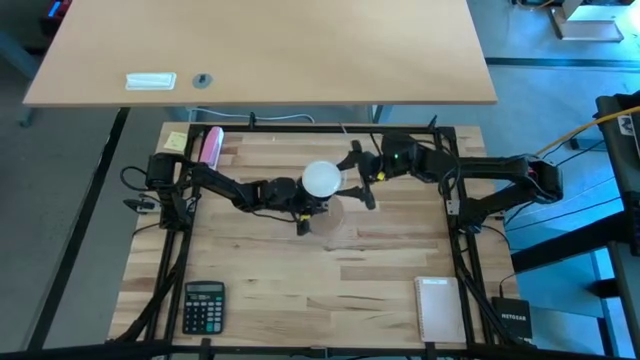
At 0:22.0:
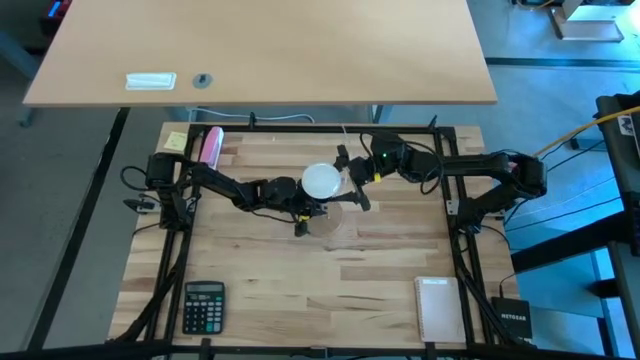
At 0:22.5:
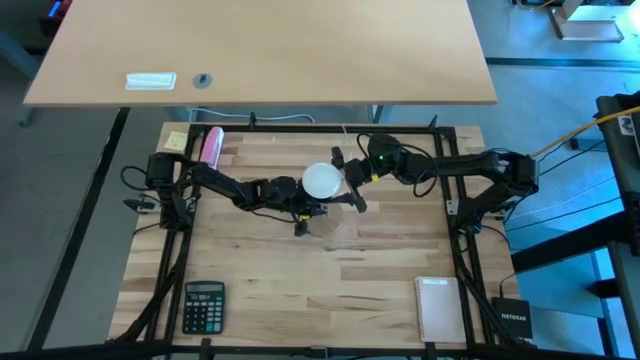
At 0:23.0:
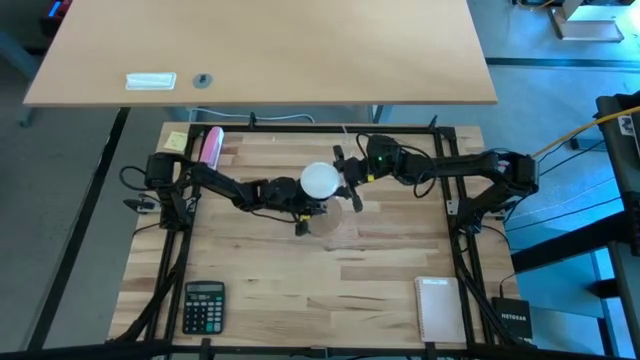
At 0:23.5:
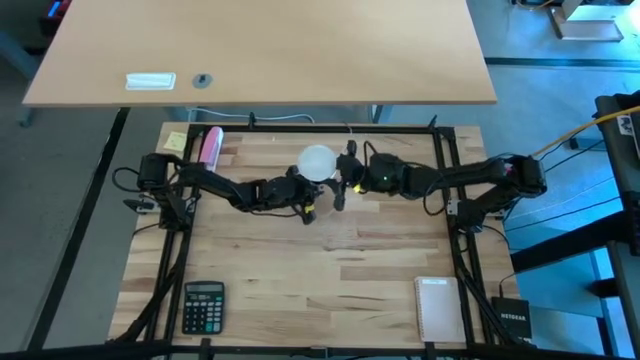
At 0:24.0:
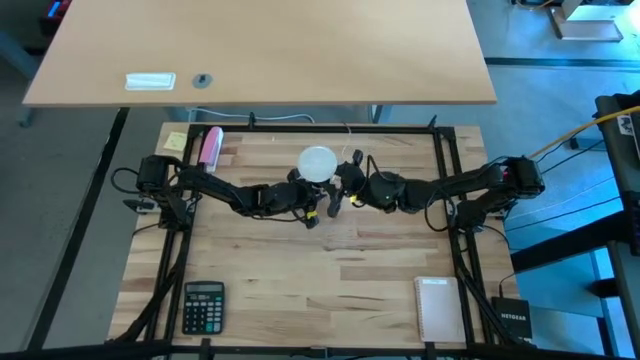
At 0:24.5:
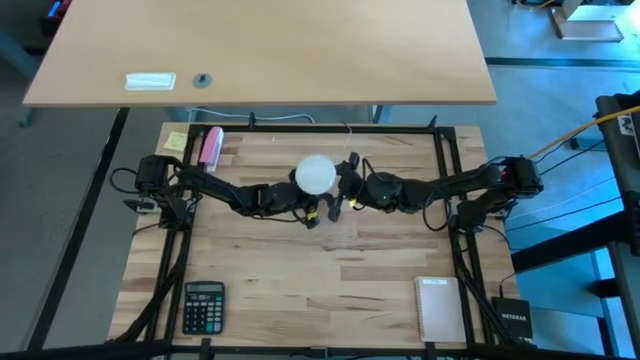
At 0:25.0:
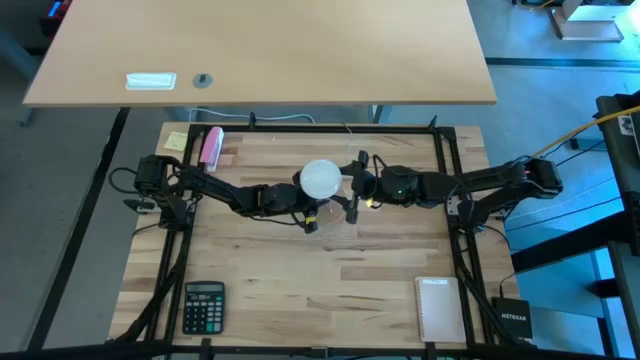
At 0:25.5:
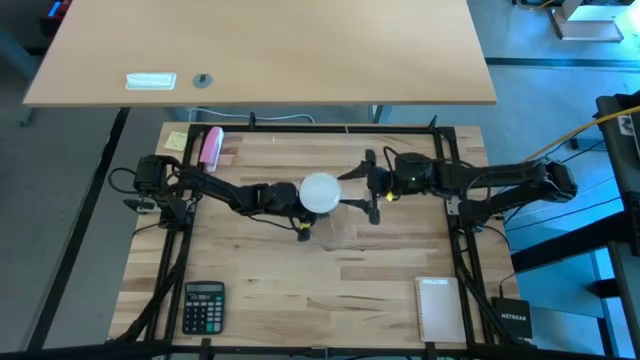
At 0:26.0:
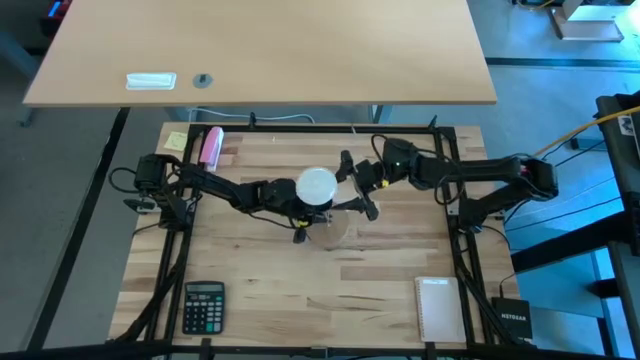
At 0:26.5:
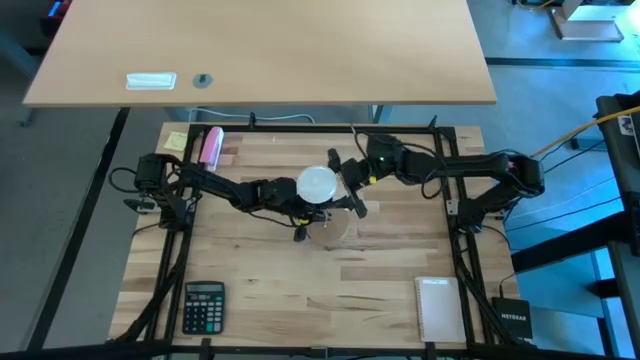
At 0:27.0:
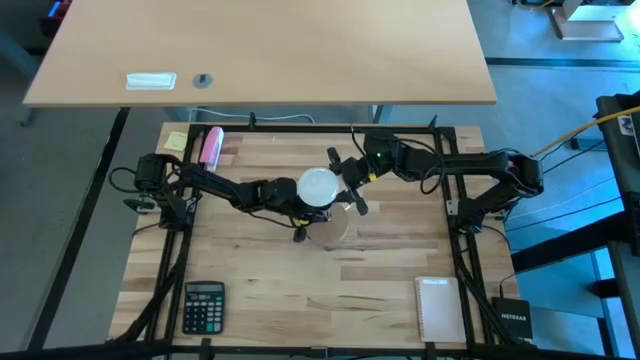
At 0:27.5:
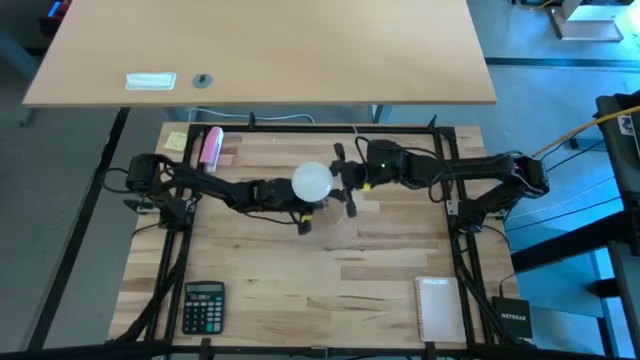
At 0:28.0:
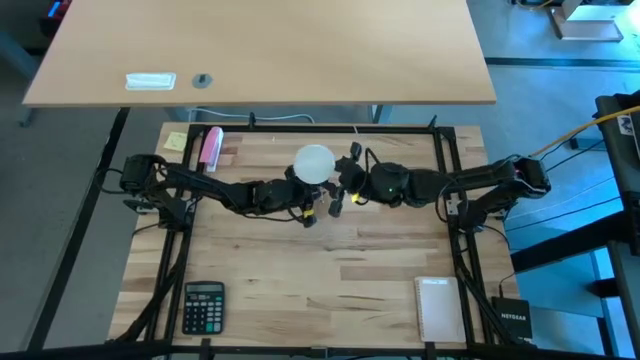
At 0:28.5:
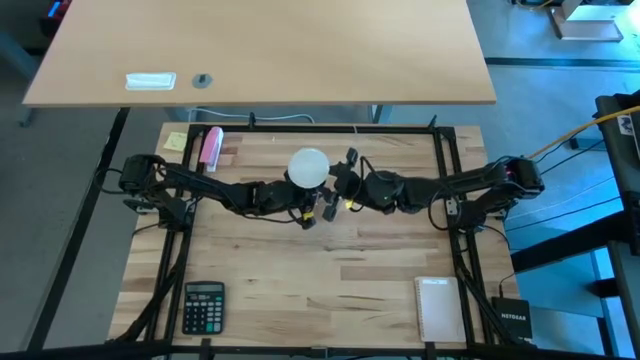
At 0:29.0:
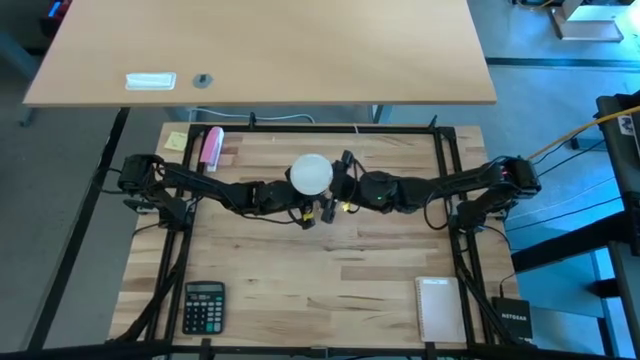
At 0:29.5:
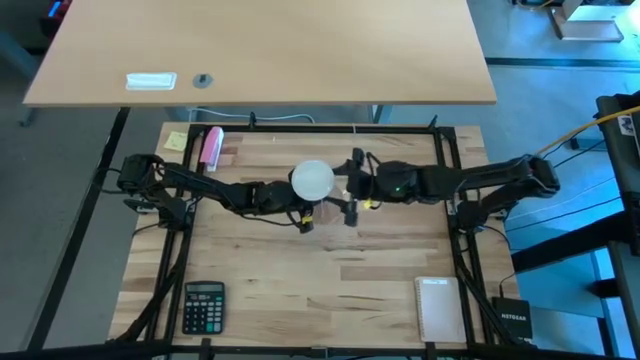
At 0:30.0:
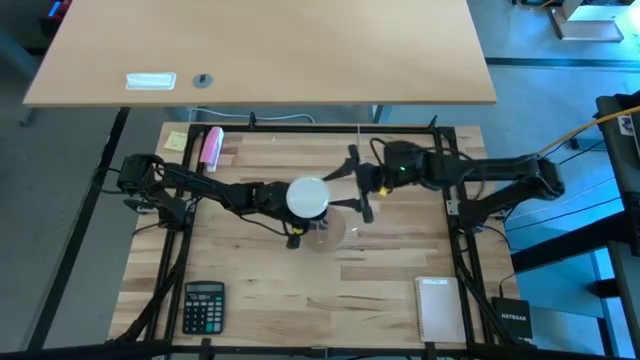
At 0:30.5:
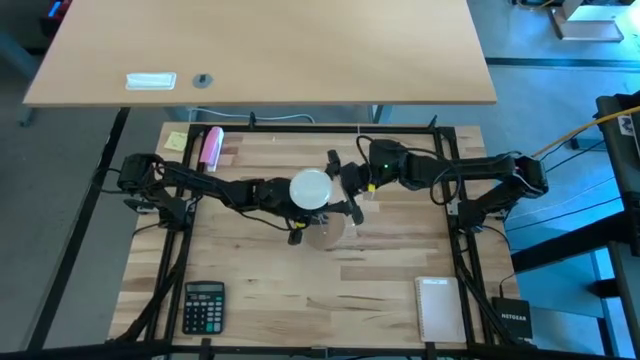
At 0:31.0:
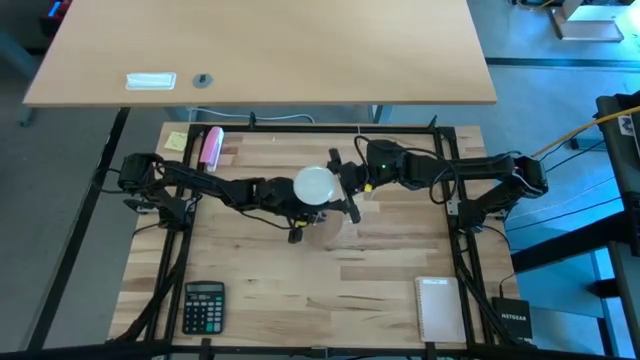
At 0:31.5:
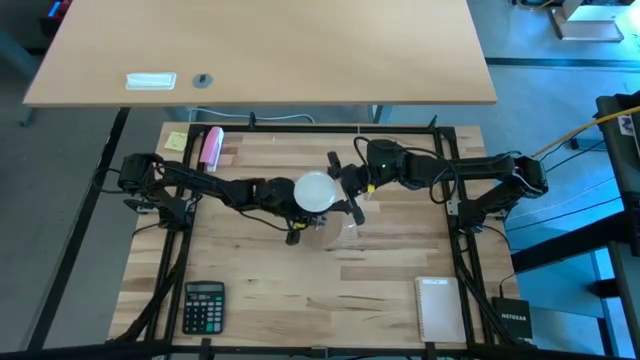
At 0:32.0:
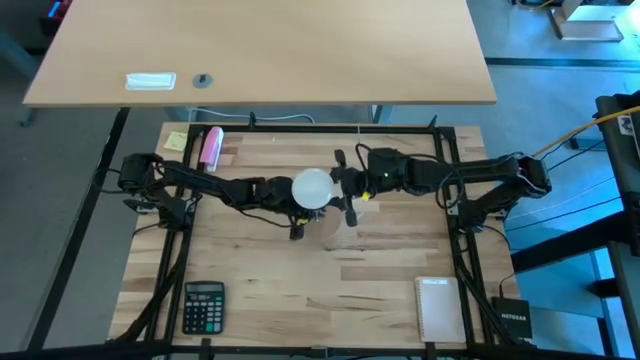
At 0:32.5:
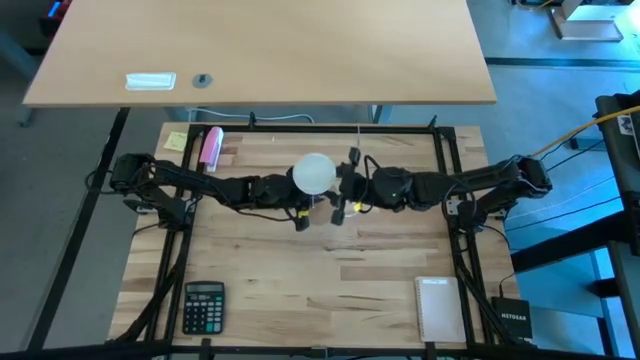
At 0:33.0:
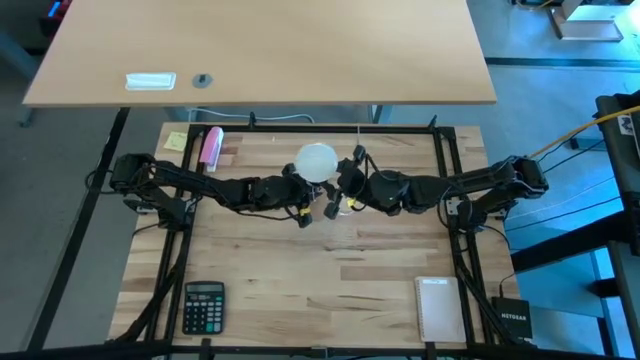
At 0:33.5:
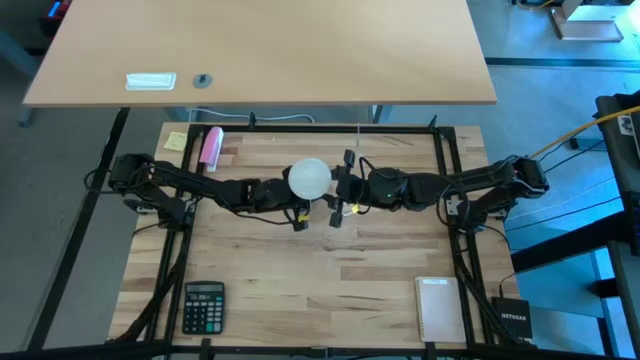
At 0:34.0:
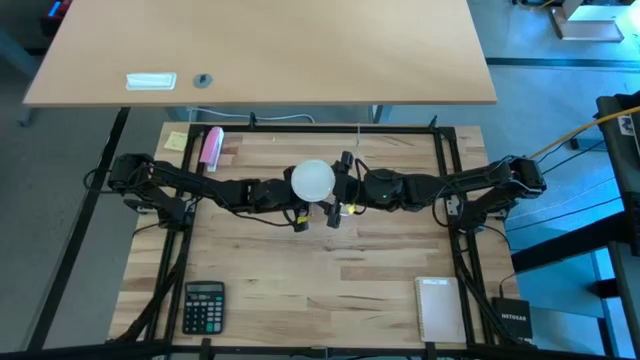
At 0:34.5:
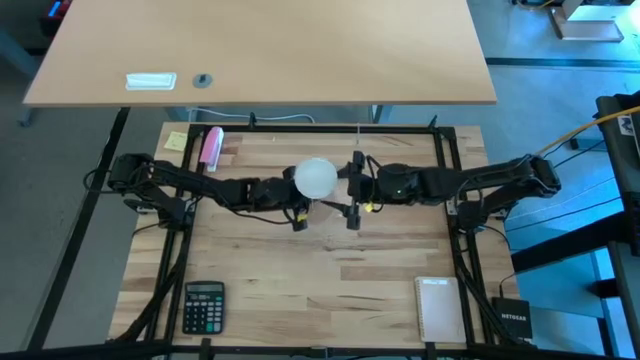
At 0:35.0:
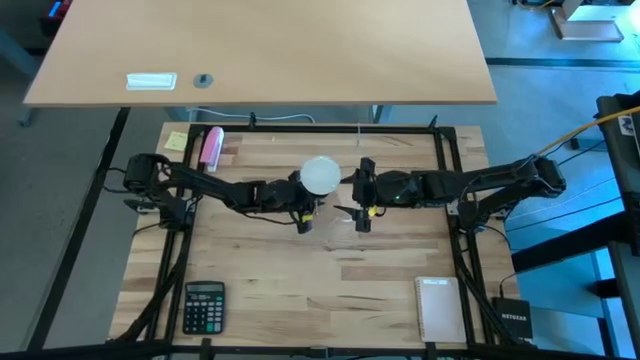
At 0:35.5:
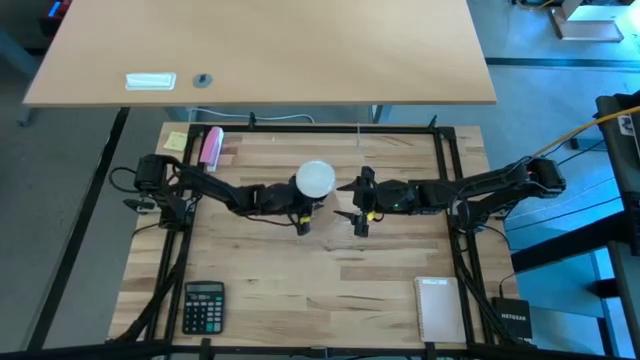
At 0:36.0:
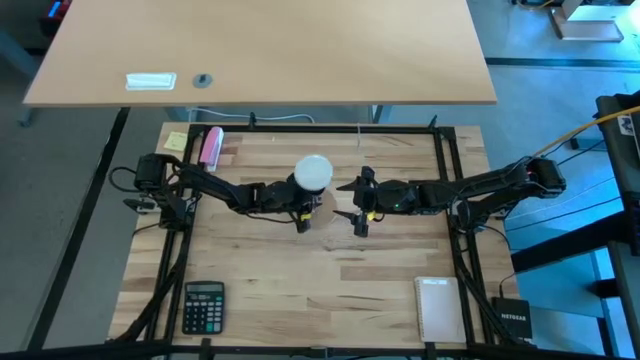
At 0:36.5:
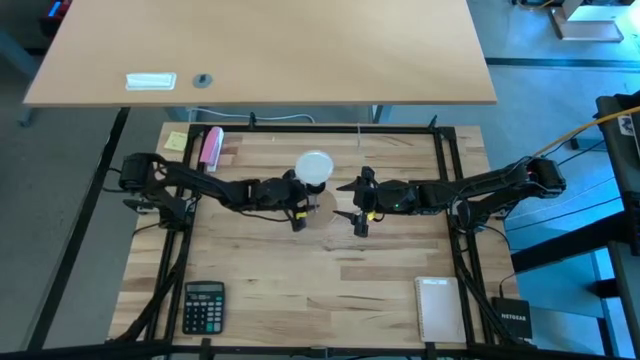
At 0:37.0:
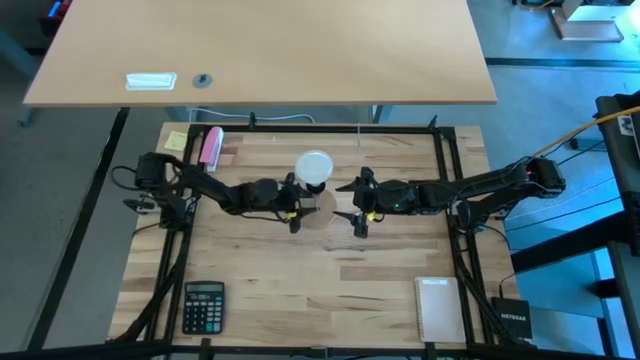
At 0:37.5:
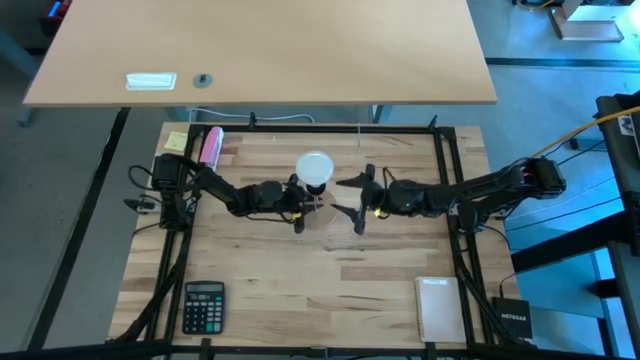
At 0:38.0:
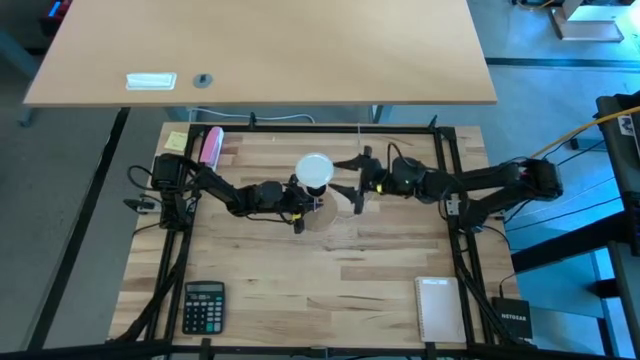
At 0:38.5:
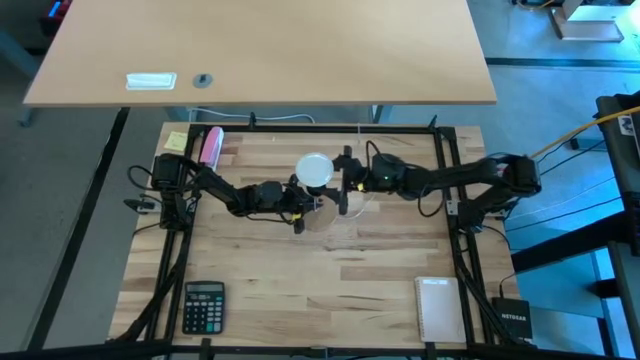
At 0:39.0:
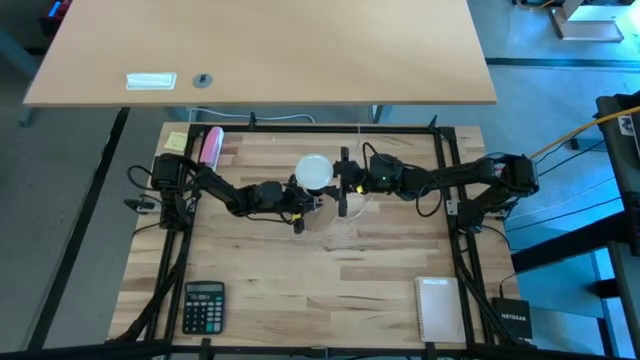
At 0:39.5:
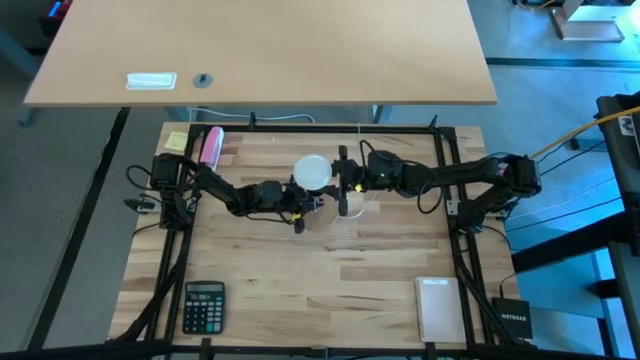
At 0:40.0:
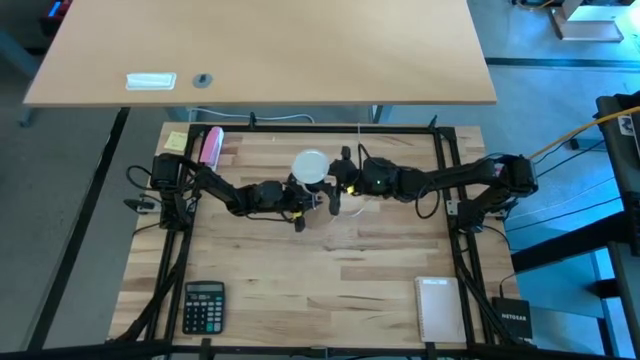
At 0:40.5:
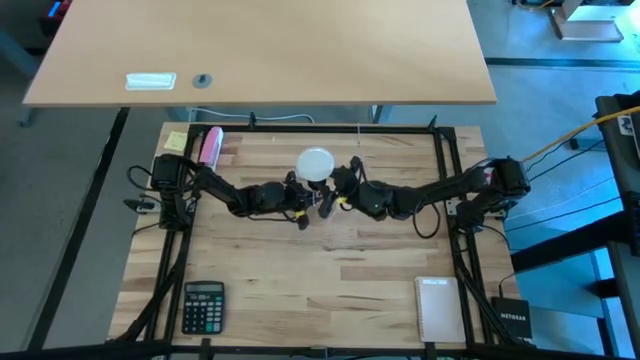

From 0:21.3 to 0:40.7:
Task: Screw lightbulb
Insert the white lightbulb into the brown lamp
